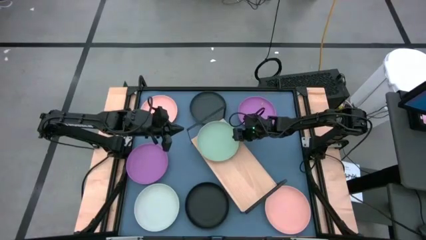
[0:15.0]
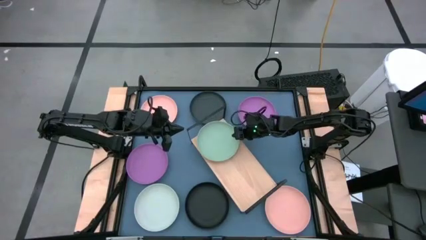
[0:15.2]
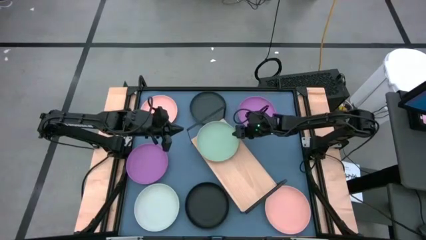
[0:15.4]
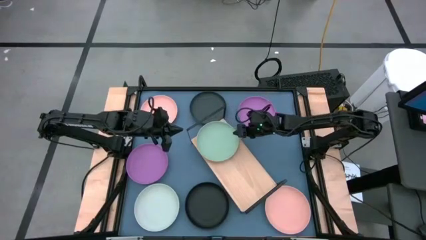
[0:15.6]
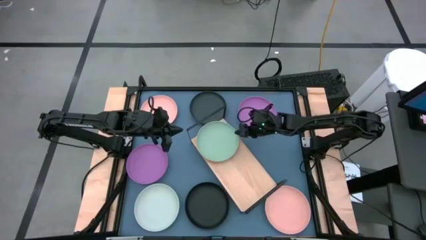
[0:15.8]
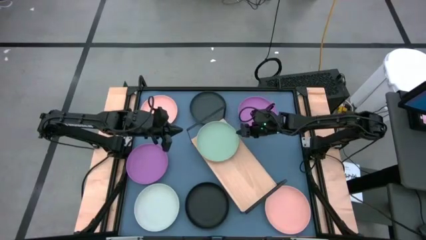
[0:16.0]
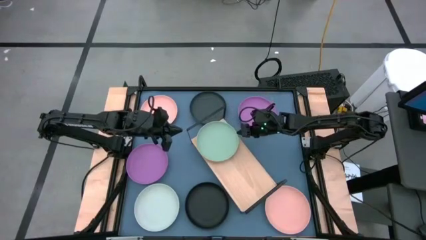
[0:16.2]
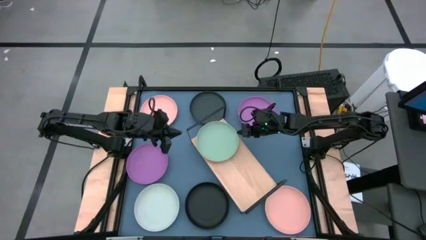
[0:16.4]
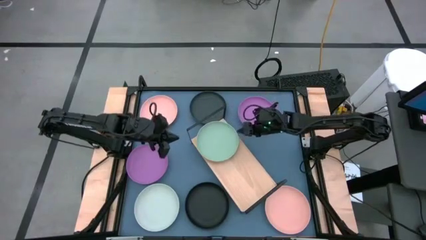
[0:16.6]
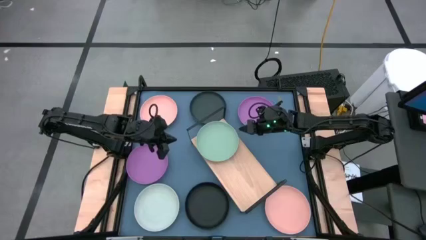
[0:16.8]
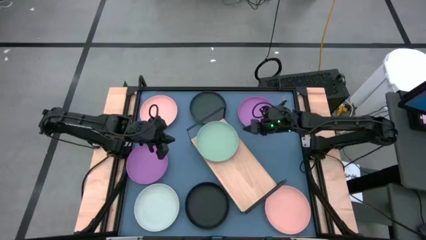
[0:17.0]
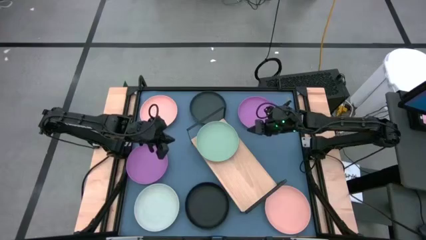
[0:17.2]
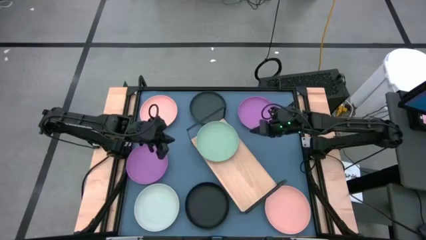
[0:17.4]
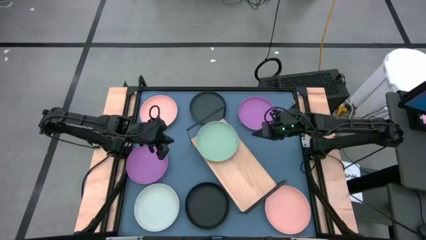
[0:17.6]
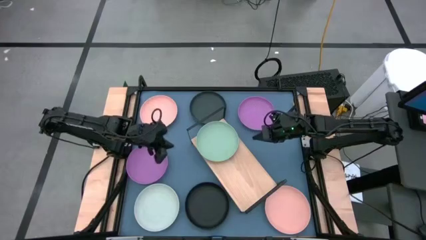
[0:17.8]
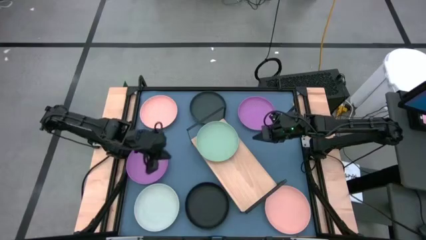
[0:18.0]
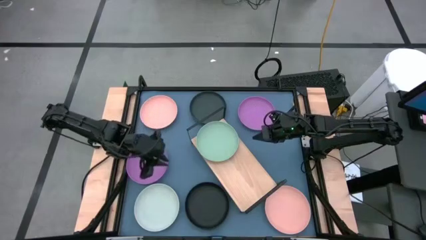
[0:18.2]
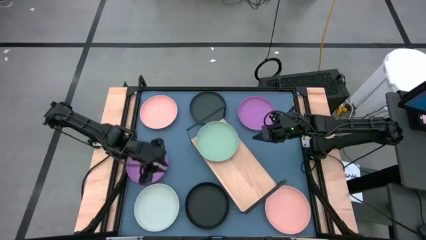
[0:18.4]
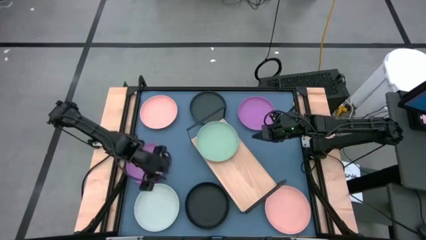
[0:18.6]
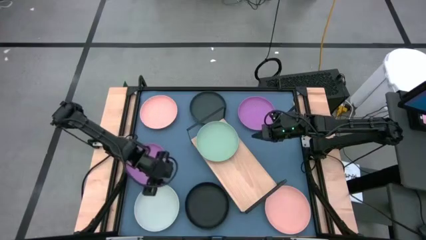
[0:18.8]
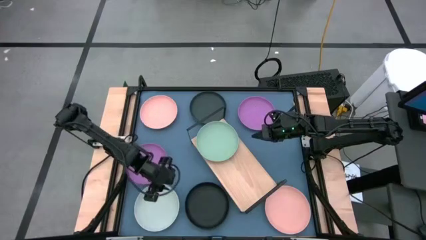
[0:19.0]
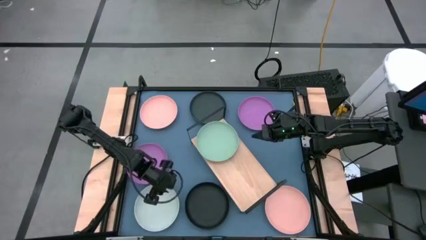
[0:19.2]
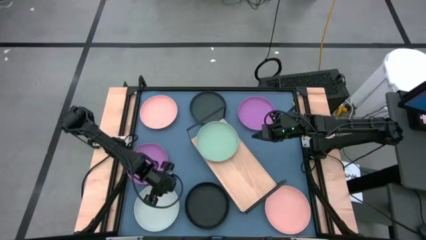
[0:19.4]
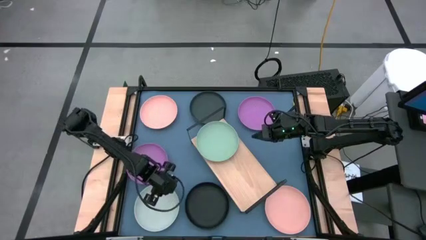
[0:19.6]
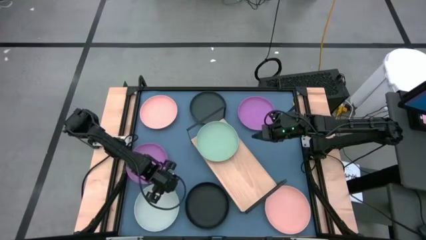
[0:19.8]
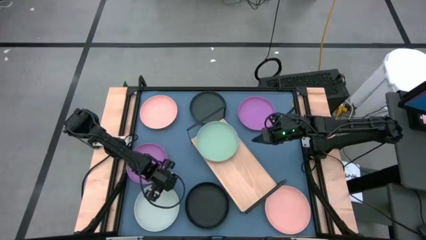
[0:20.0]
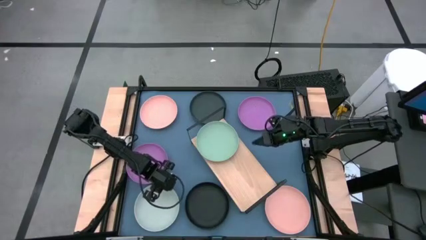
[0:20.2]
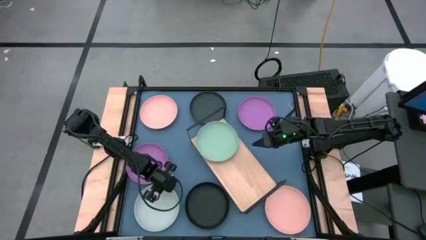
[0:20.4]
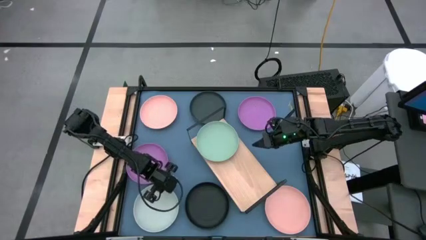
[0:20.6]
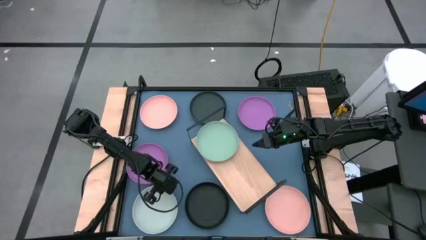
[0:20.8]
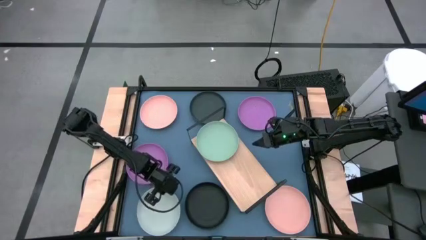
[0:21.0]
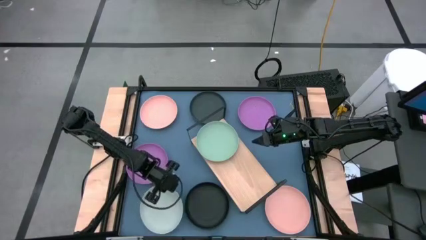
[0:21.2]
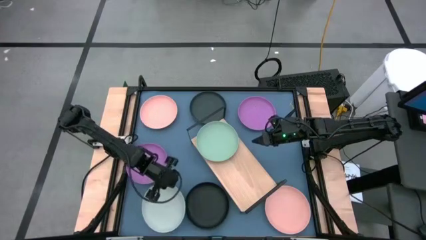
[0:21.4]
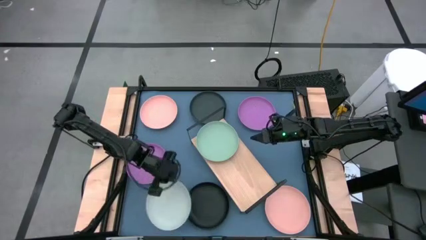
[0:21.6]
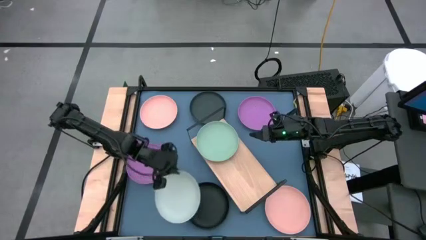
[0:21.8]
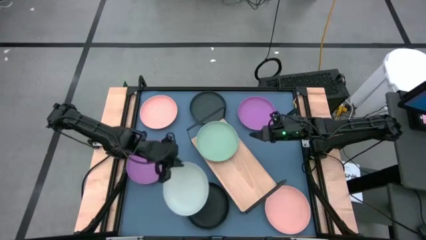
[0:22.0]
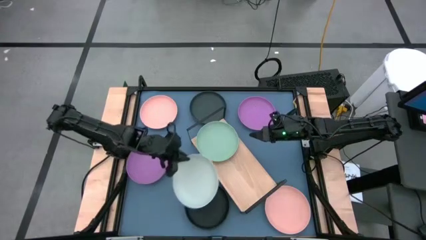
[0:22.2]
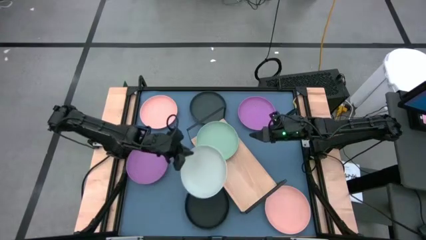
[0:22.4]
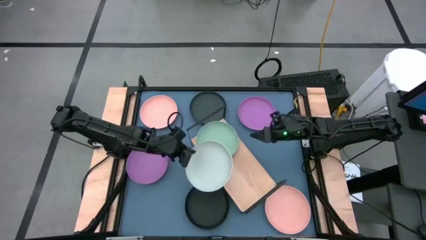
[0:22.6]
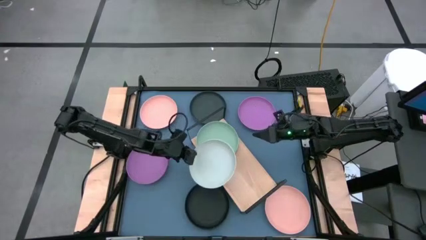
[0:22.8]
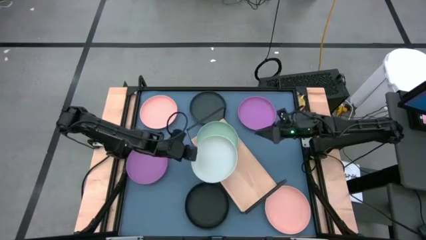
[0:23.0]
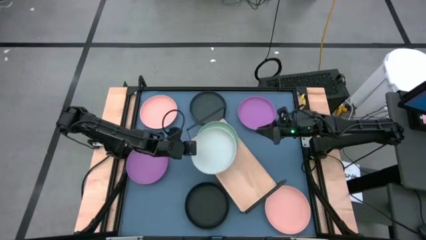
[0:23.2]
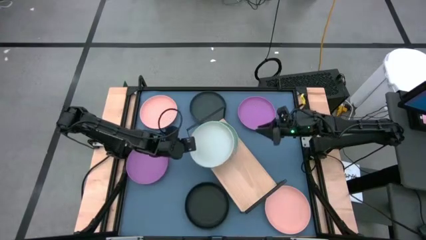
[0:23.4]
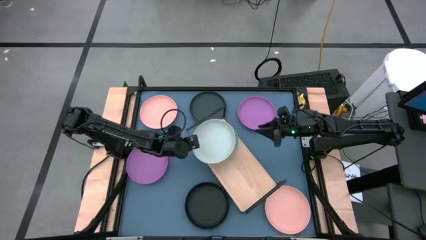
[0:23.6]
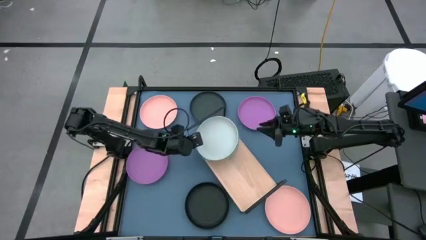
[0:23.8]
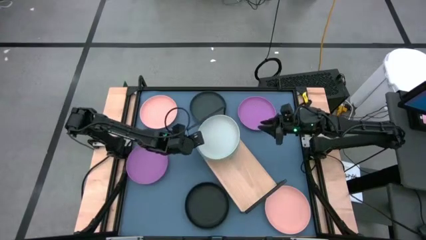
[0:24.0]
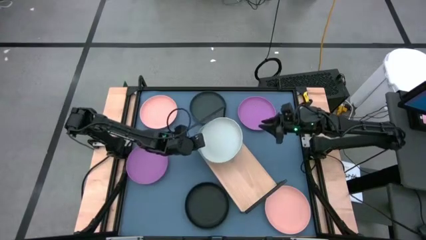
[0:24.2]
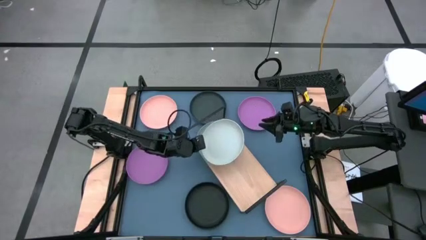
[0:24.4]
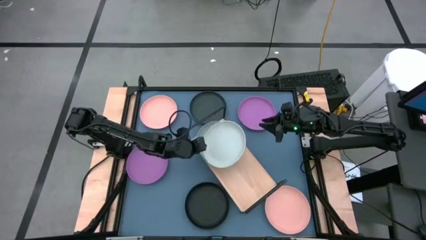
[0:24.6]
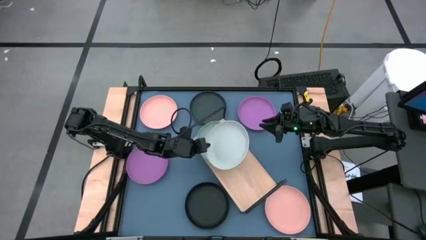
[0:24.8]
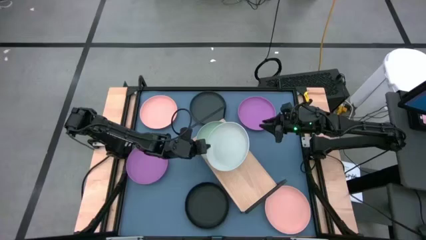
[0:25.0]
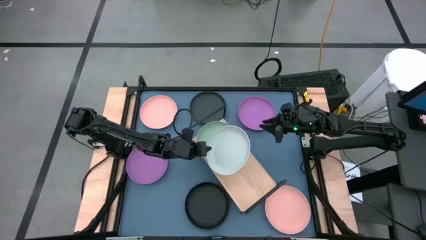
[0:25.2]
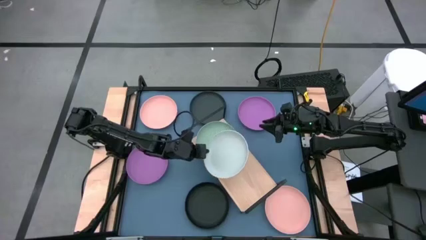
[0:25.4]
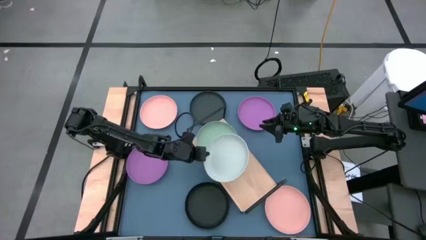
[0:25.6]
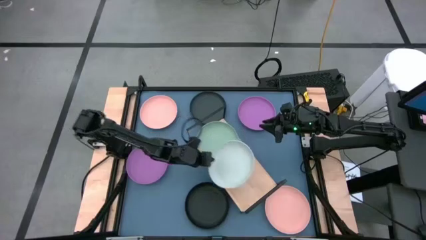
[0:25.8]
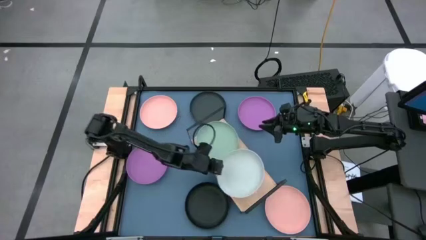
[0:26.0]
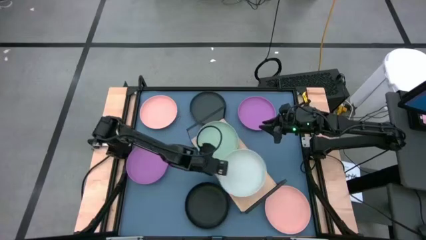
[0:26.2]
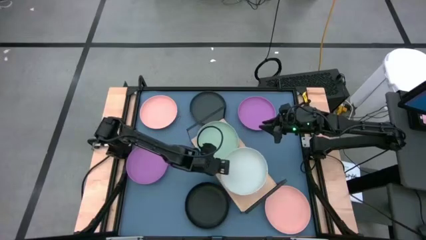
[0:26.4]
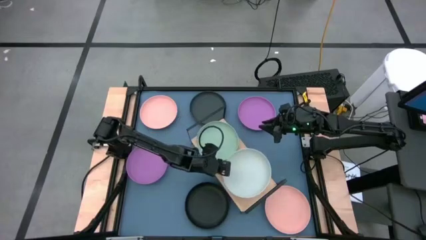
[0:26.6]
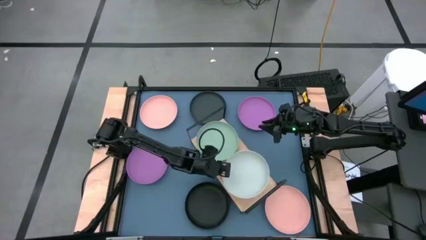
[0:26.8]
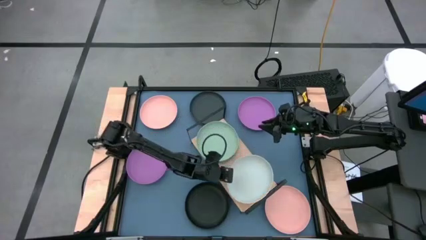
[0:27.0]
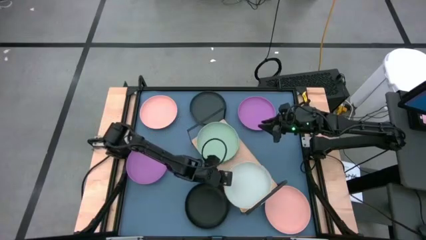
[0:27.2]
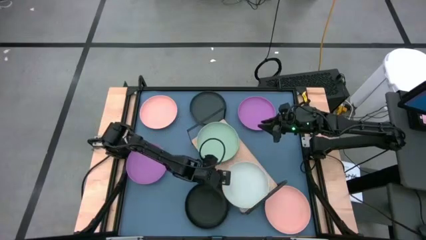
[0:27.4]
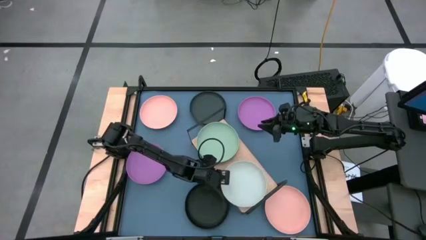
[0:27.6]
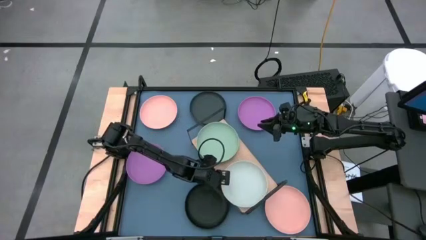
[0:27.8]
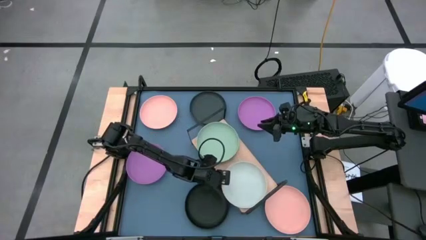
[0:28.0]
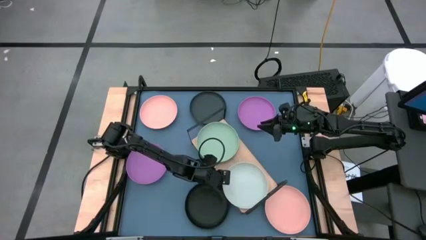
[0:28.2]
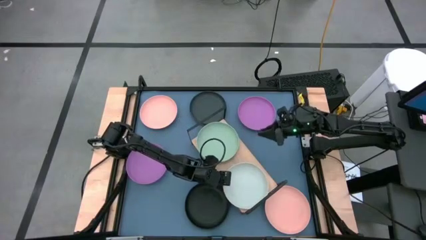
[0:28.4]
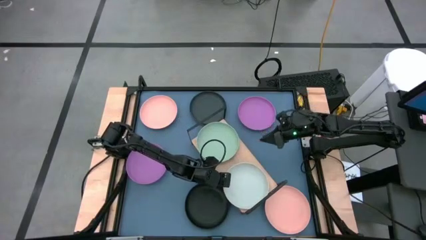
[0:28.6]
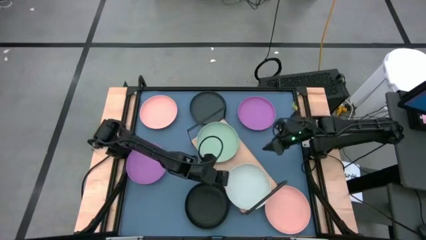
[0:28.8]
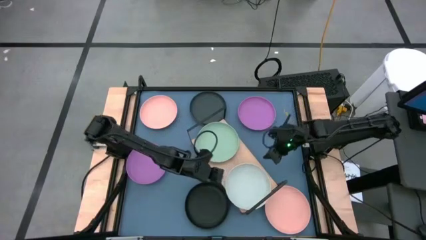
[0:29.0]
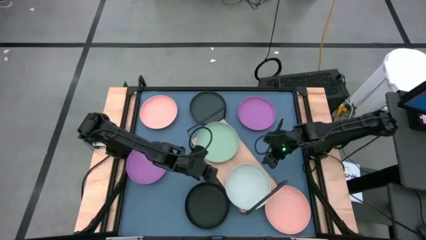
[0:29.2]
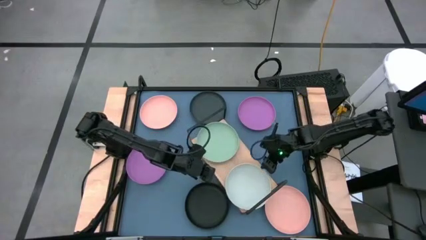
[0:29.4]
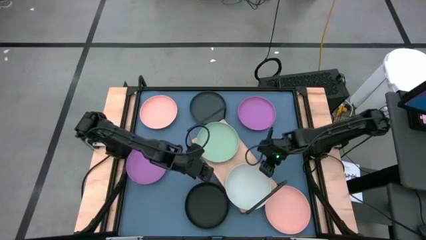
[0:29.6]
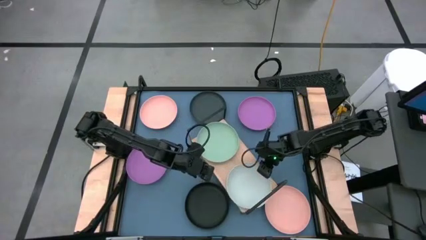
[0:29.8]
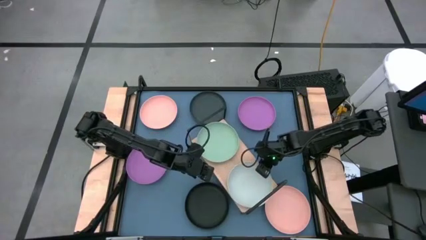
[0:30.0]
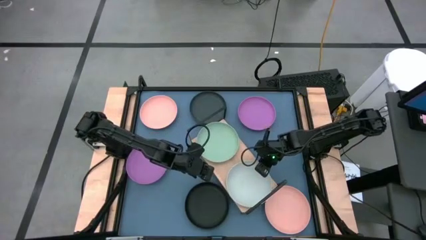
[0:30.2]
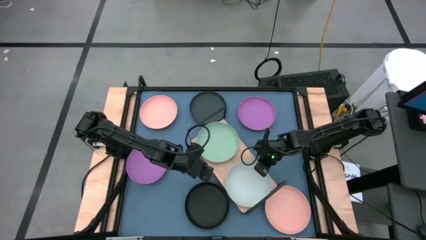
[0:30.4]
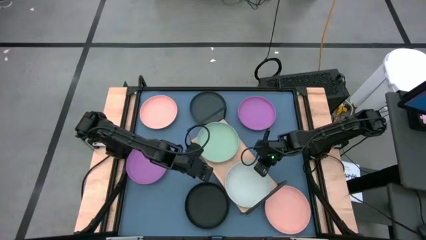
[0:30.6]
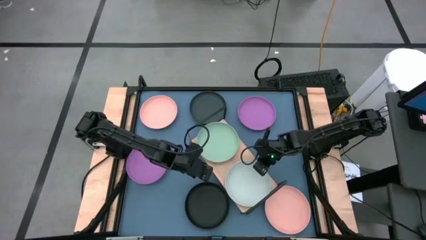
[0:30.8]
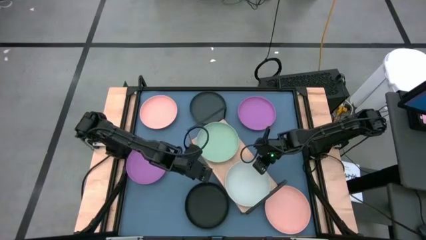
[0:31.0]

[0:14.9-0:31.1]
Task: Place and stack plates onto a shelf
Put the light blue plate on the shelf

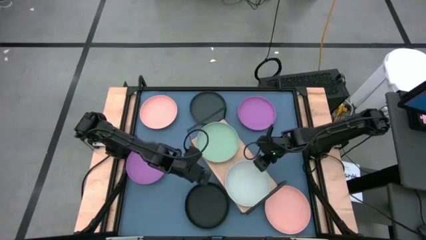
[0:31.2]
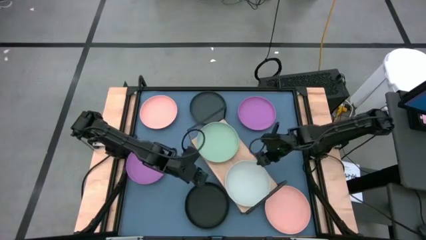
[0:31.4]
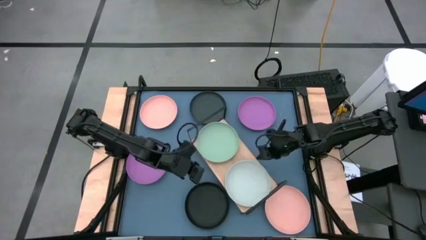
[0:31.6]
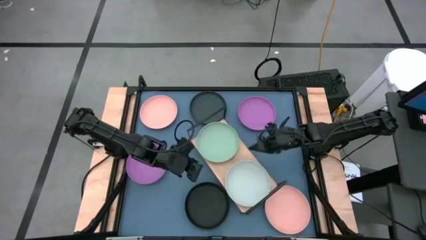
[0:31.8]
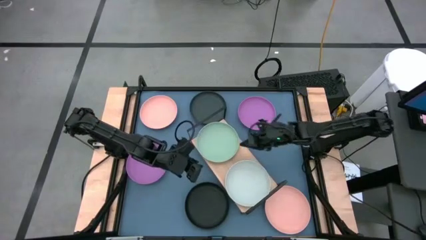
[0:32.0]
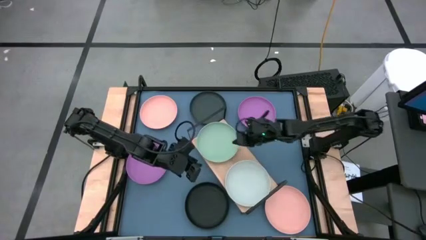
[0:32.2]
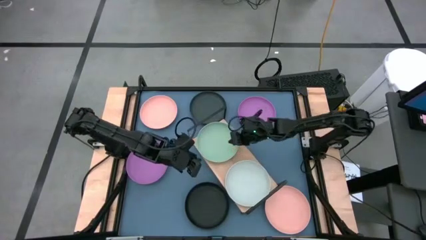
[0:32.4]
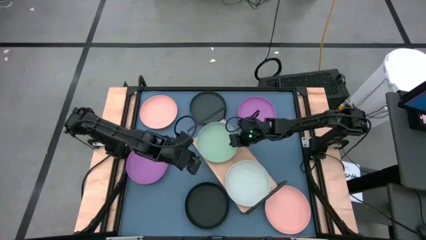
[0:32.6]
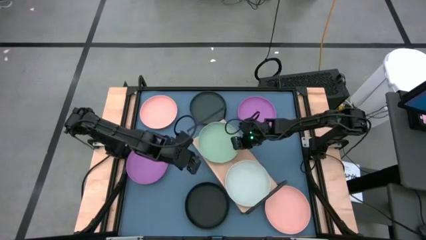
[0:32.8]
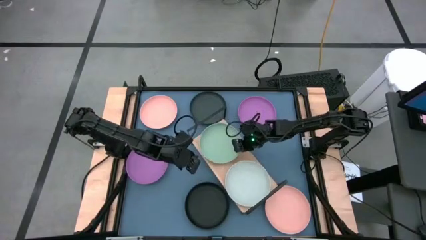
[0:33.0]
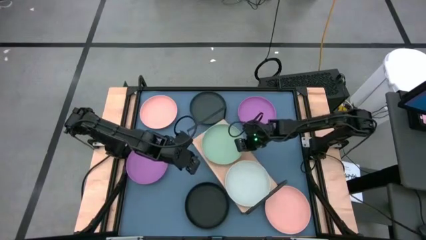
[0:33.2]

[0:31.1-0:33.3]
Adjust the green plate on the shelf
